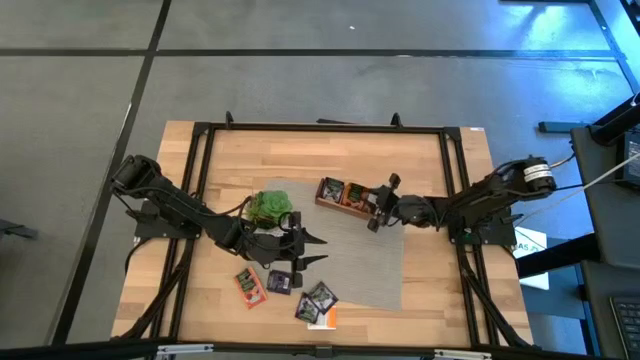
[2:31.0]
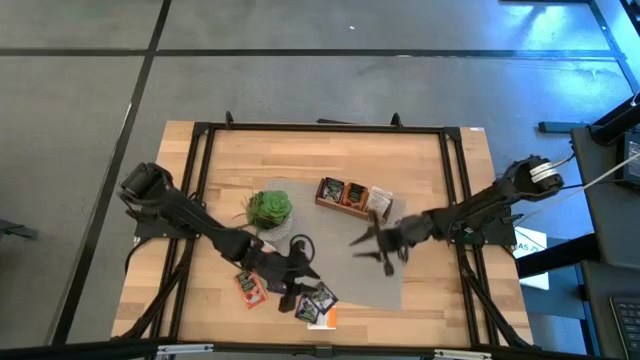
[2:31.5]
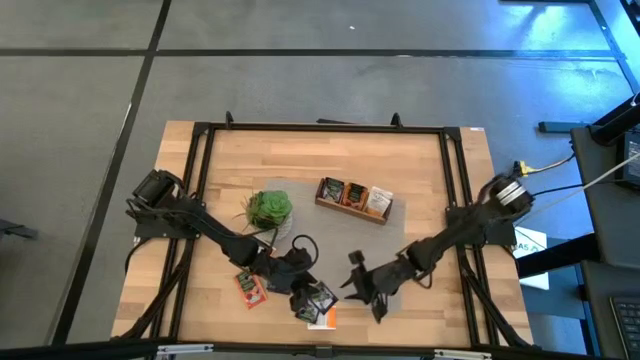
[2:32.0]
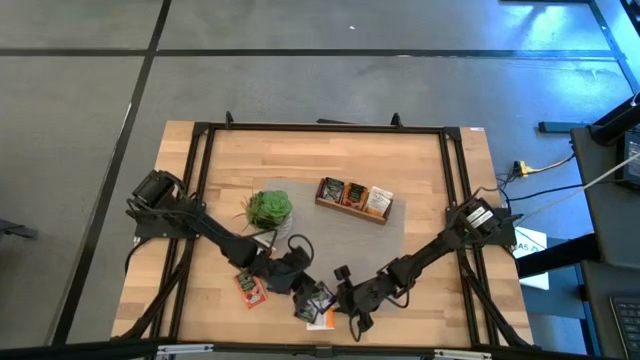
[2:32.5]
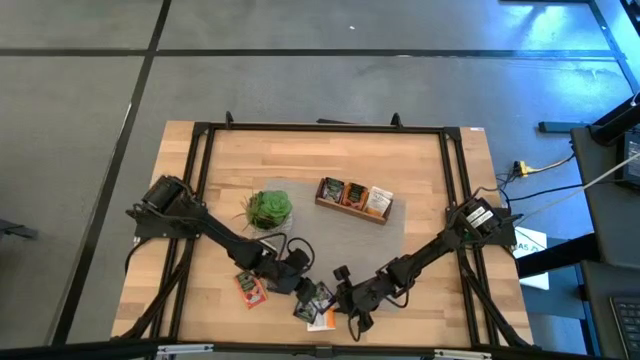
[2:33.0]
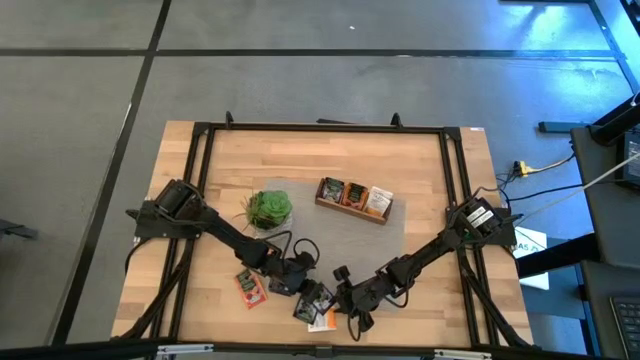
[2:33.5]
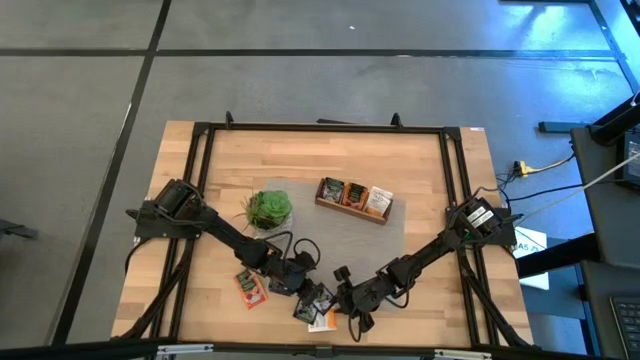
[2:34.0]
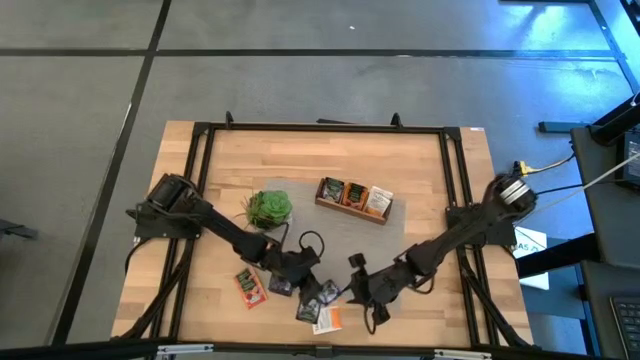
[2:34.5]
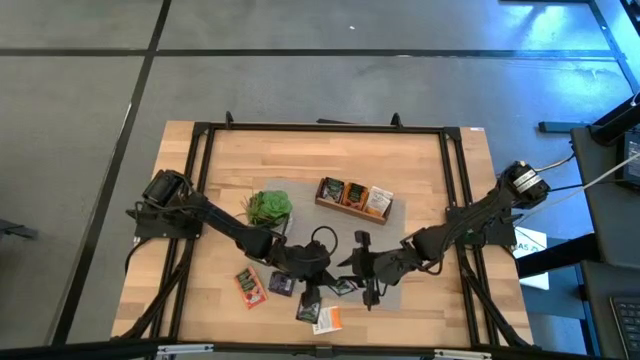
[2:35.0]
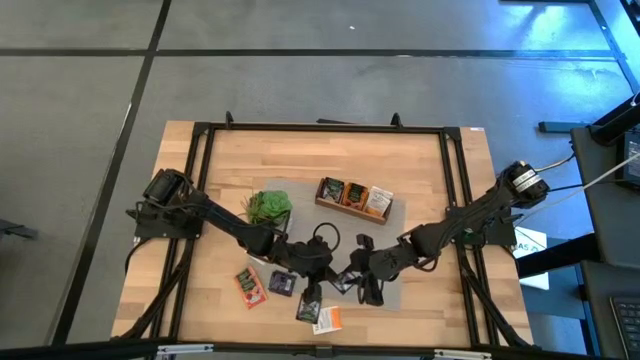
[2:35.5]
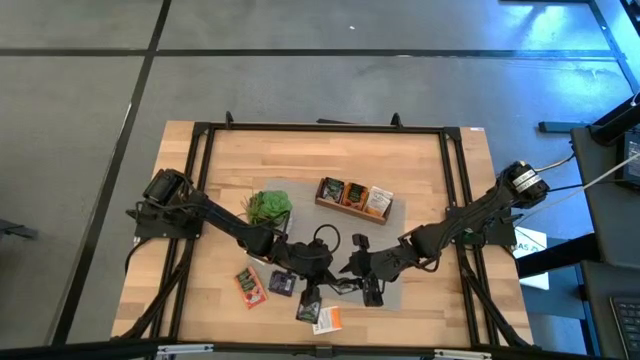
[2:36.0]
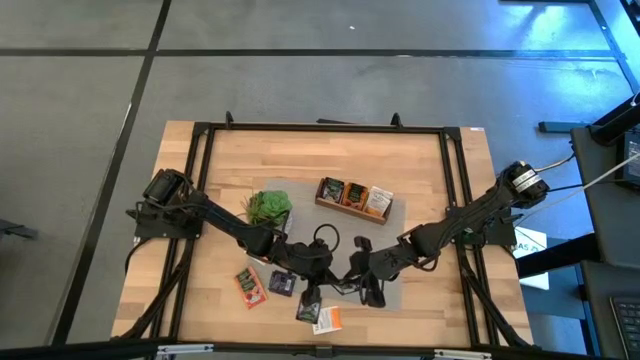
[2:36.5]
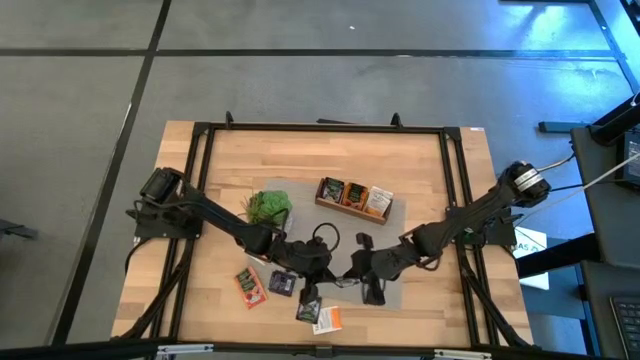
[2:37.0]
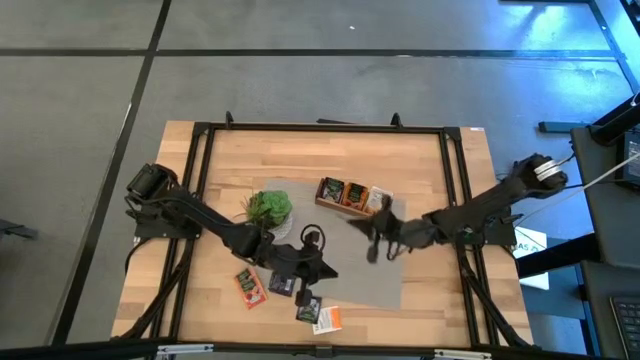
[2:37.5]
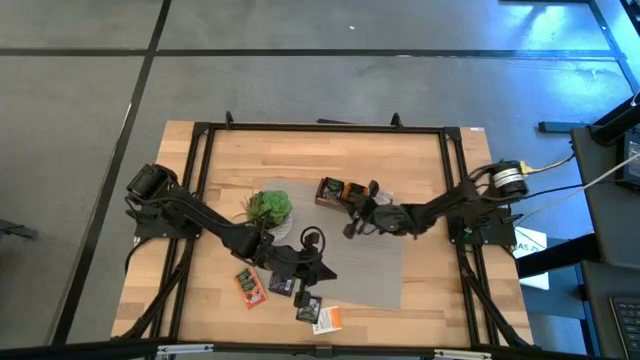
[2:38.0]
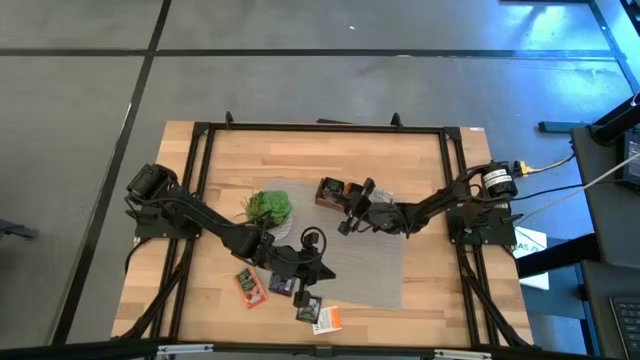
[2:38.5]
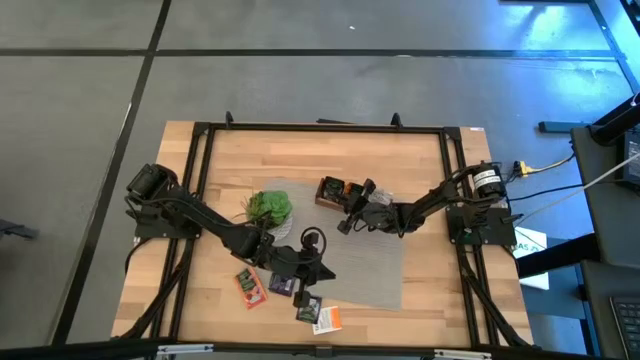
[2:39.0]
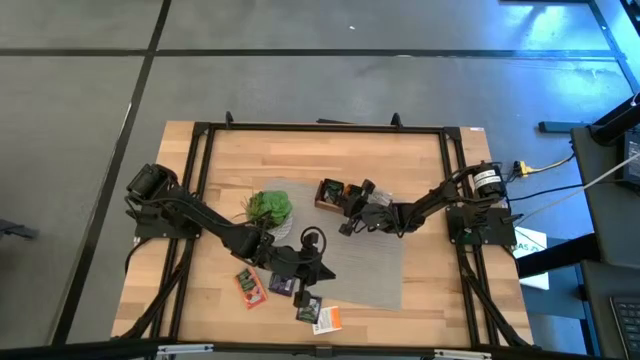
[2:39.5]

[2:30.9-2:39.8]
Task: Pick & Place Tea
Put the violet tea bag into the left section of the wooden organizer

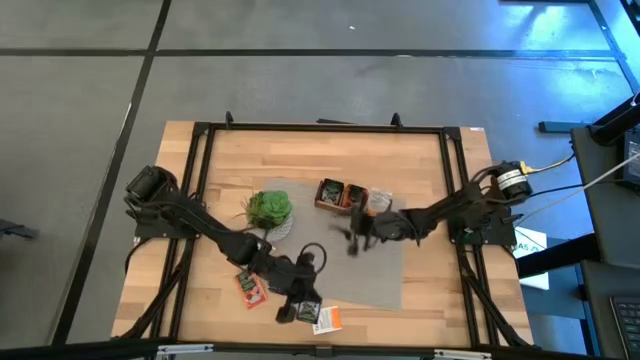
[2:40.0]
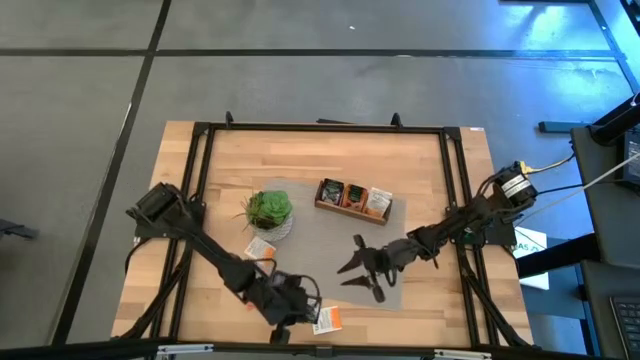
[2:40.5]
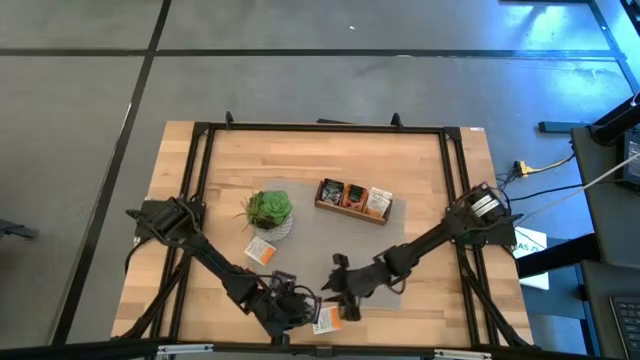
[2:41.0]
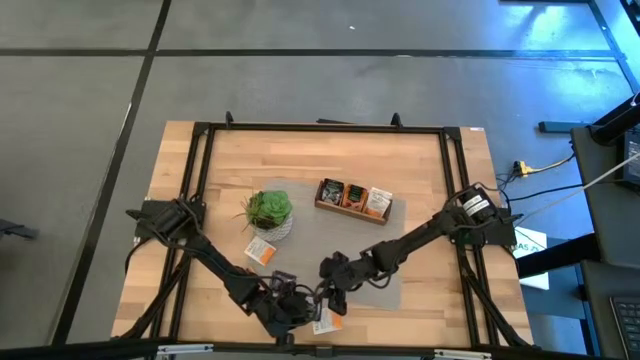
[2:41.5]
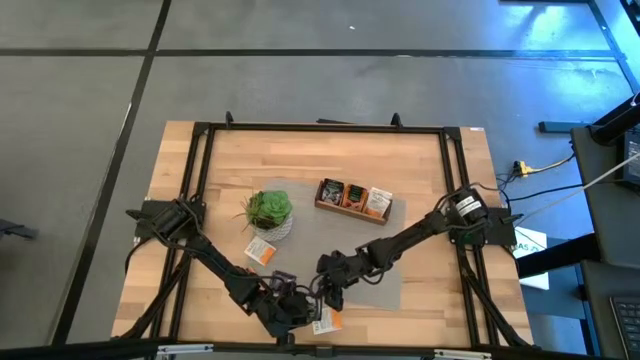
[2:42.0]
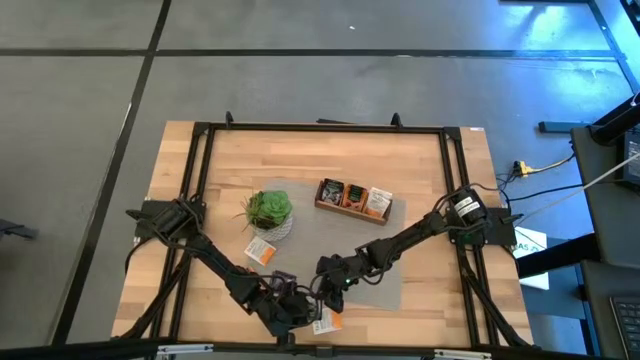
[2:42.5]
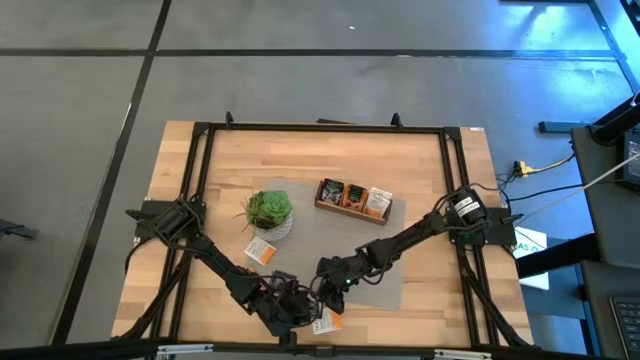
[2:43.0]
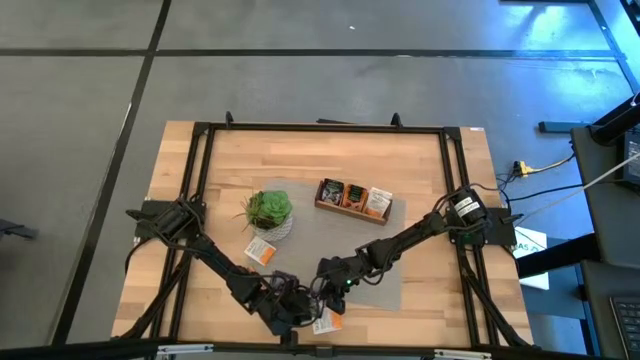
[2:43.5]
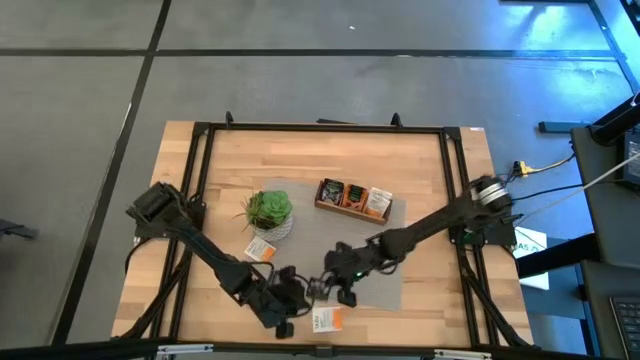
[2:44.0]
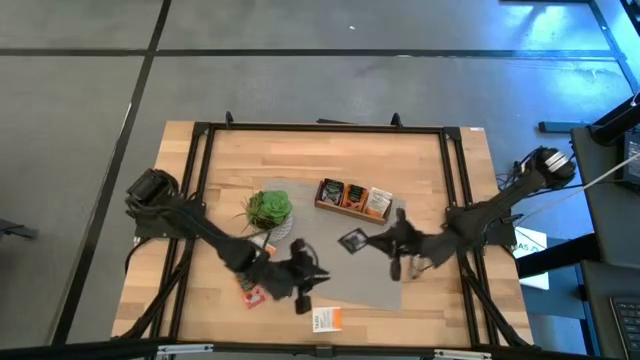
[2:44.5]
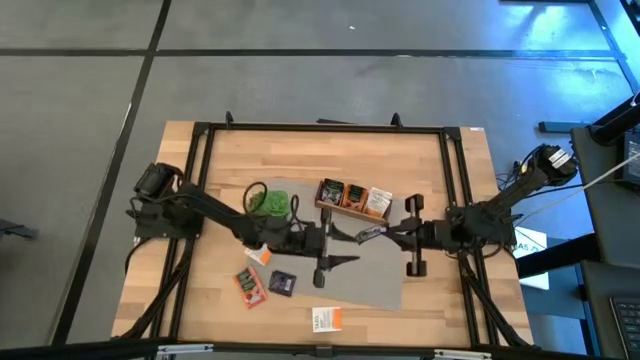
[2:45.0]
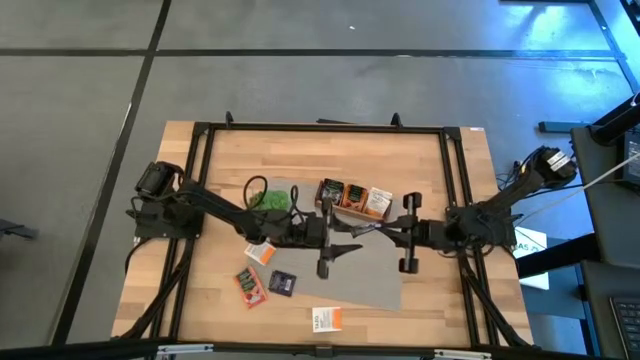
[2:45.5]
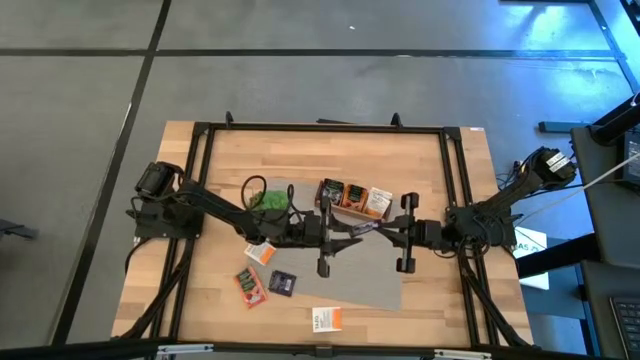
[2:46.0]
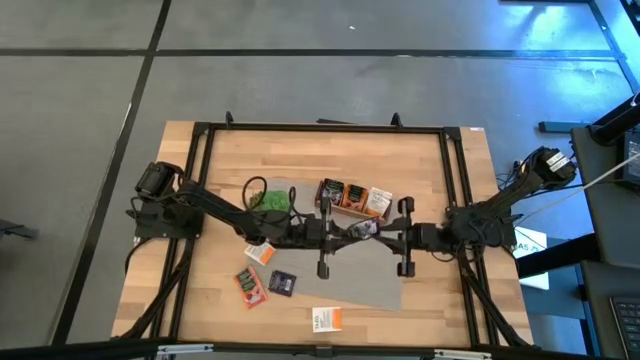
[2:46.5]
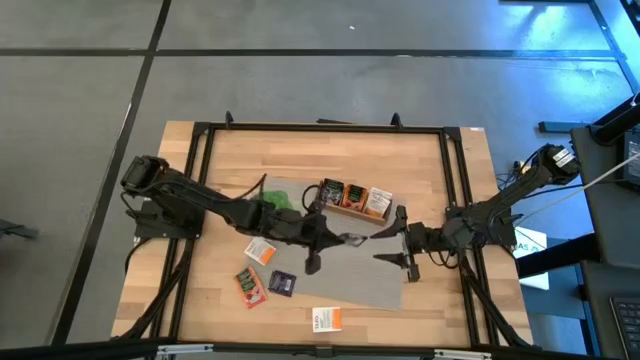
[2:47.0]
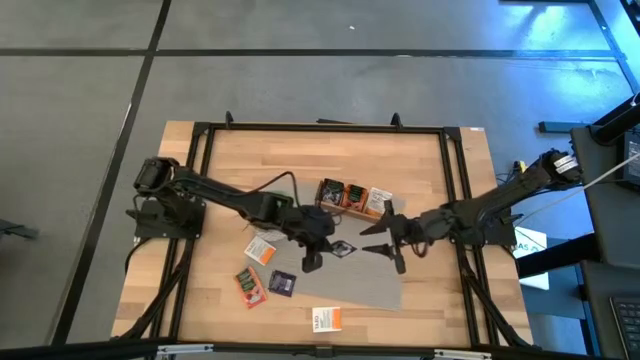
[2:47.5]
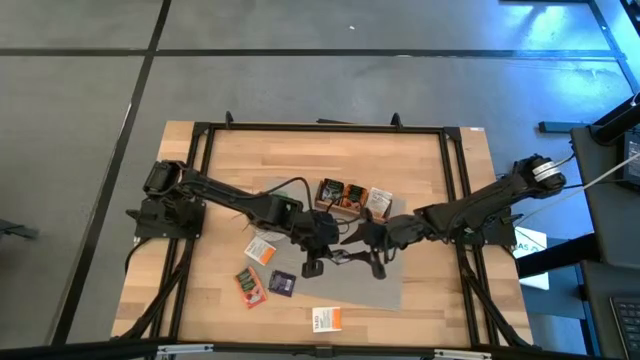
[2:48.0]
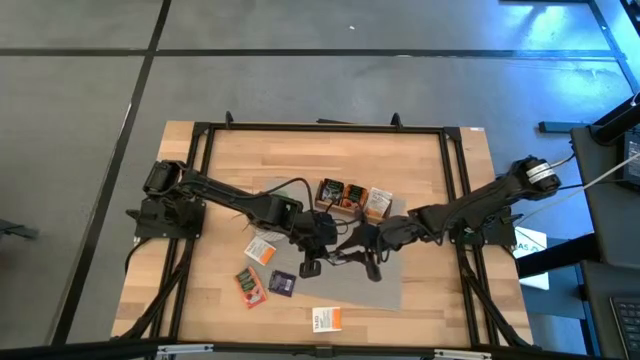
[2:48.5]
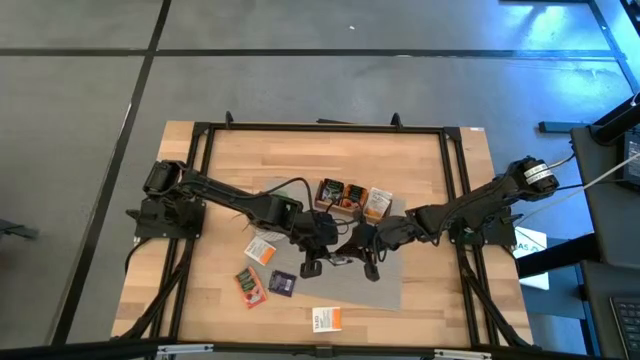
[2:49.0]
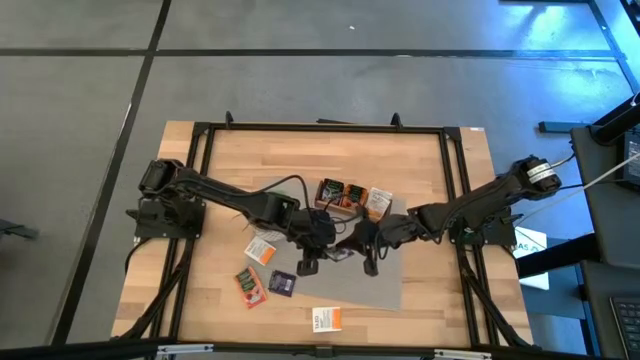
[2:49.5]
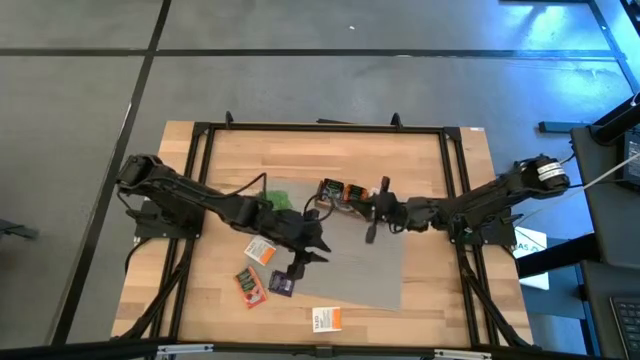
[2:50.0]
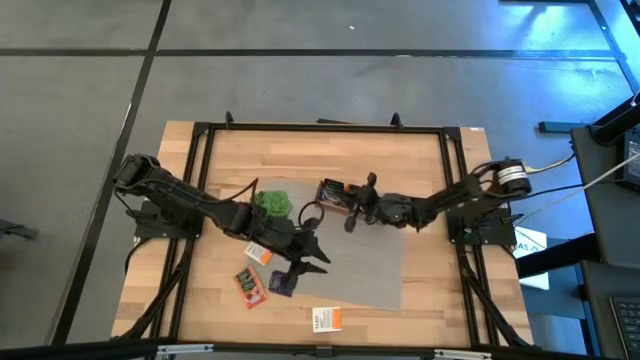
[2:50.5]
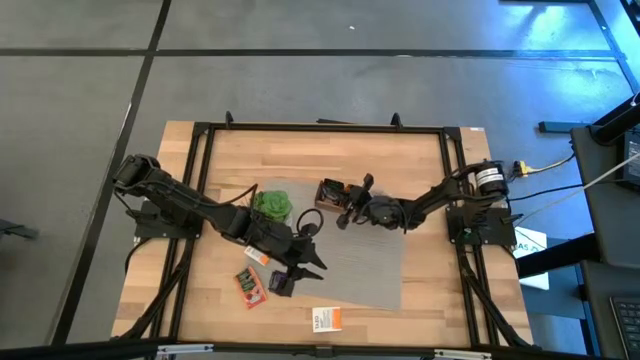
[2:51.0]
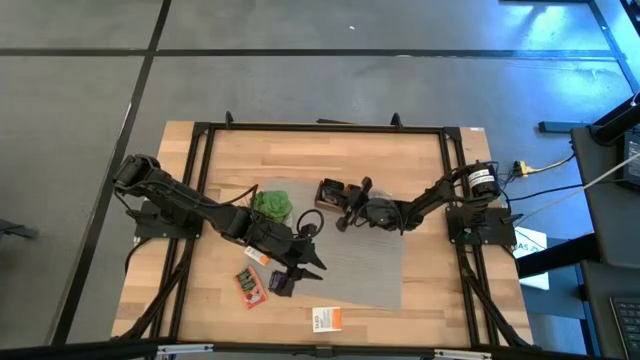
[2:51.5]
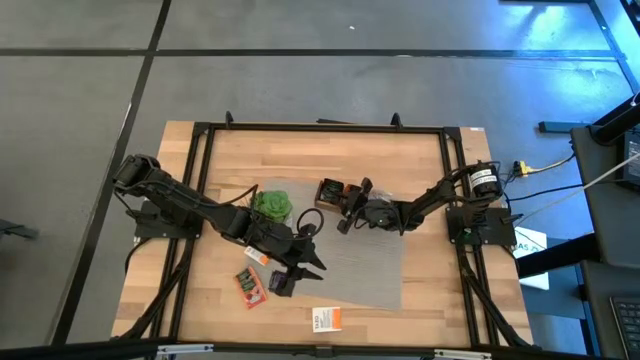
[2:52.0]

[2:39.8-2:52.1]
Put the violet tea bag into the left section of the wooden organizer

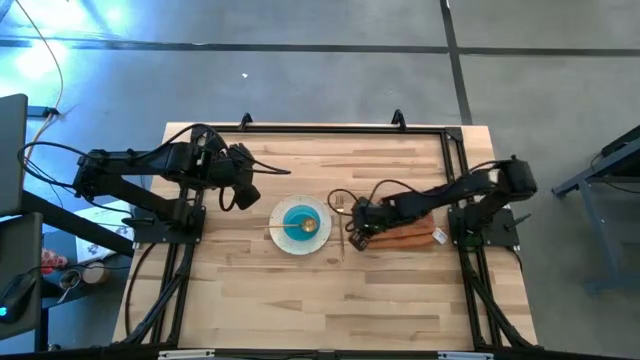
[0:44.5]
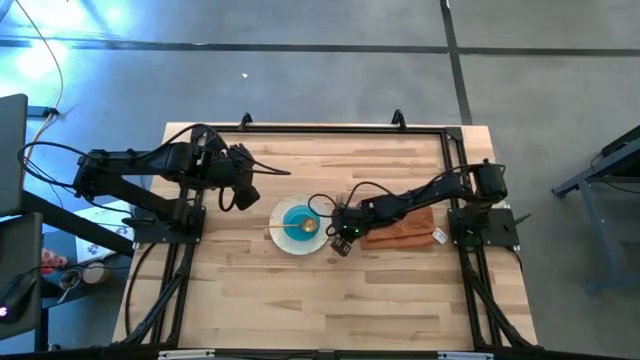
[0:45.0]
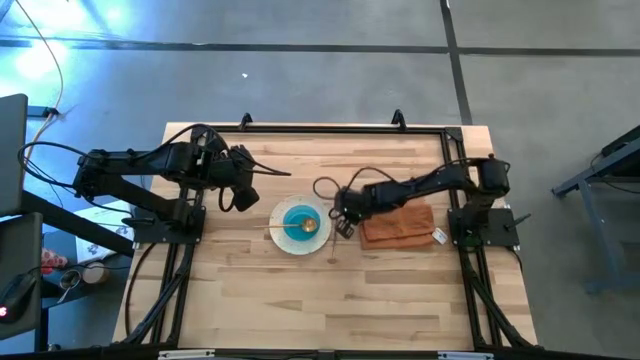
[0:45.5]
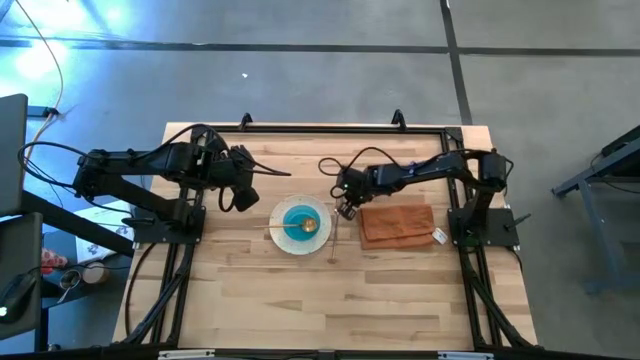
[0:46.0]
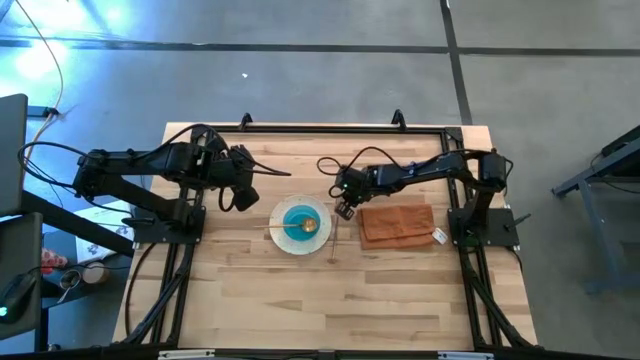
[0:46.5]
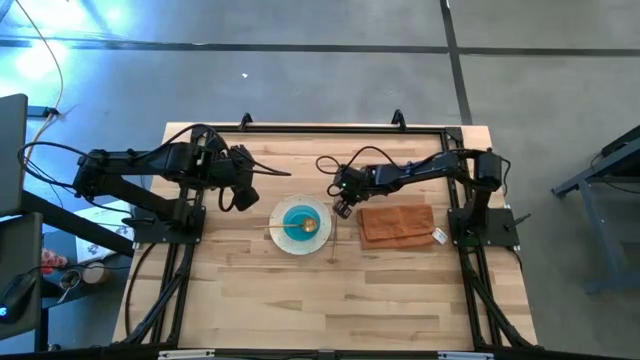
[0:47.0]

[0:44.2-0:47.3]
Task: Set table place
Adjust the gold fork on the table
